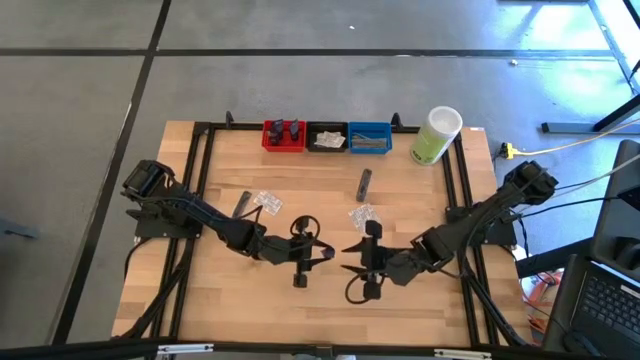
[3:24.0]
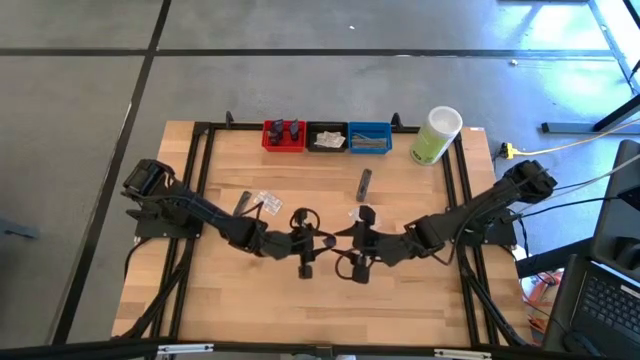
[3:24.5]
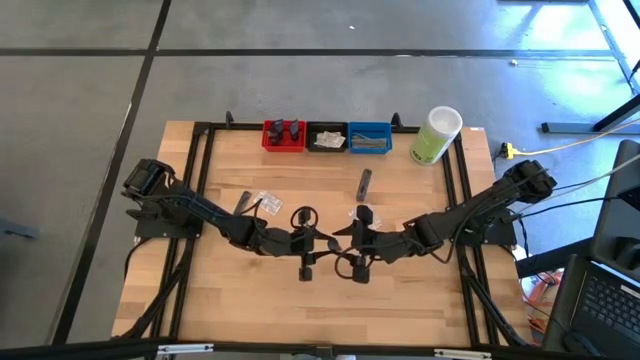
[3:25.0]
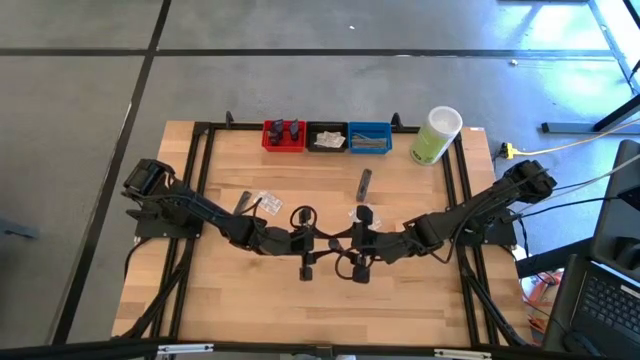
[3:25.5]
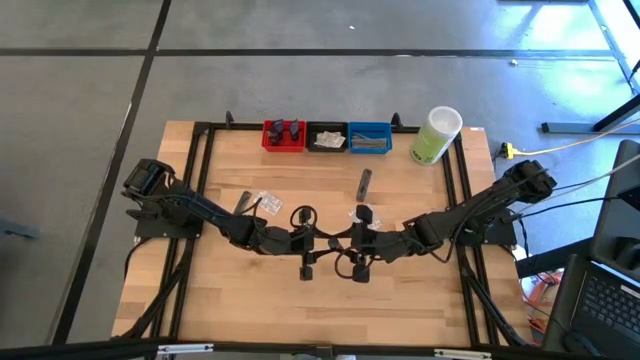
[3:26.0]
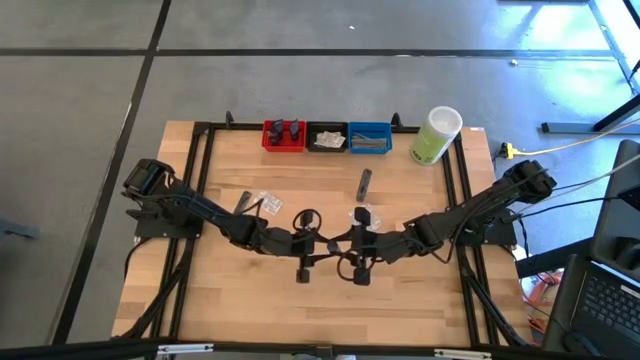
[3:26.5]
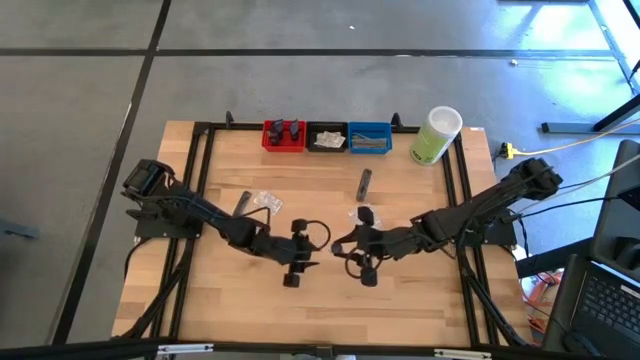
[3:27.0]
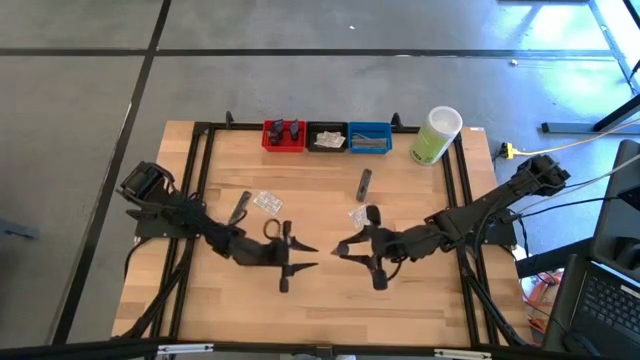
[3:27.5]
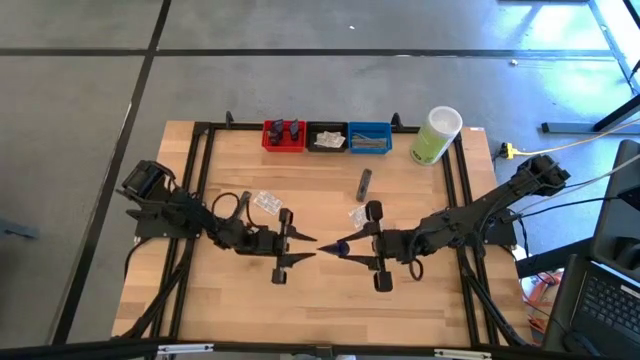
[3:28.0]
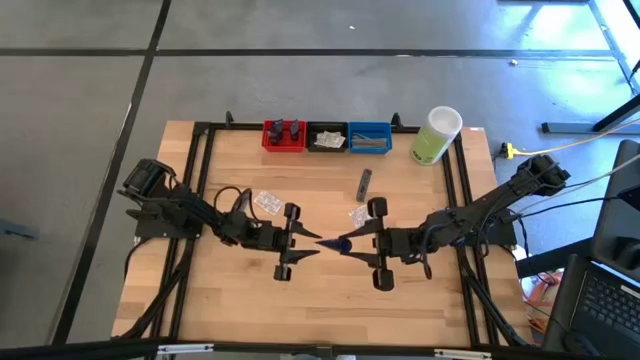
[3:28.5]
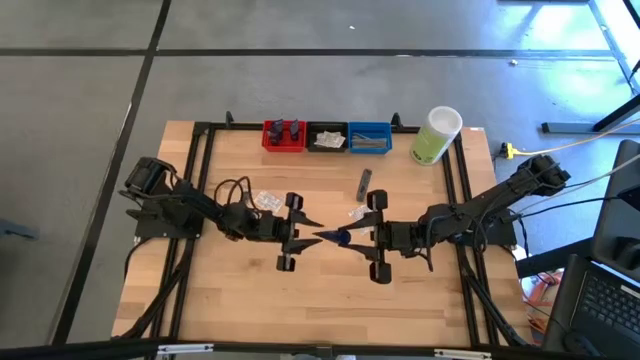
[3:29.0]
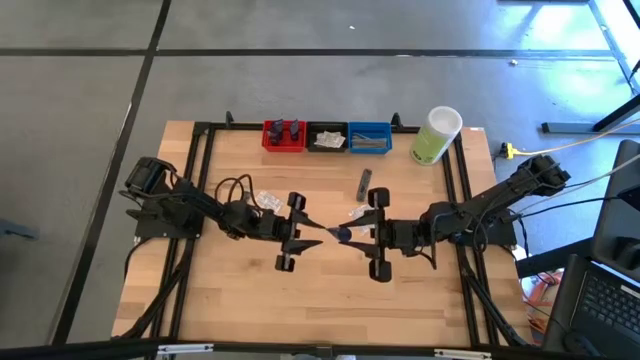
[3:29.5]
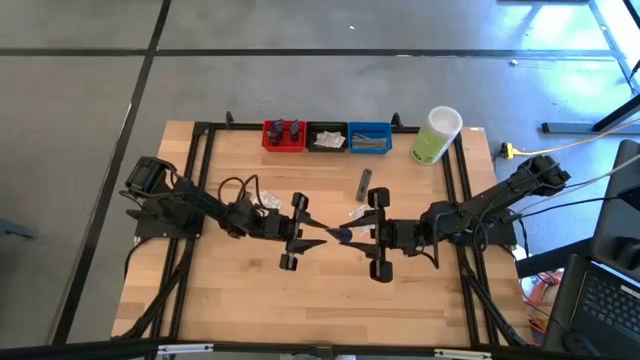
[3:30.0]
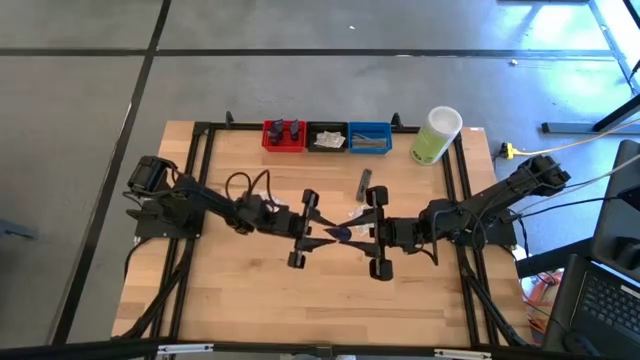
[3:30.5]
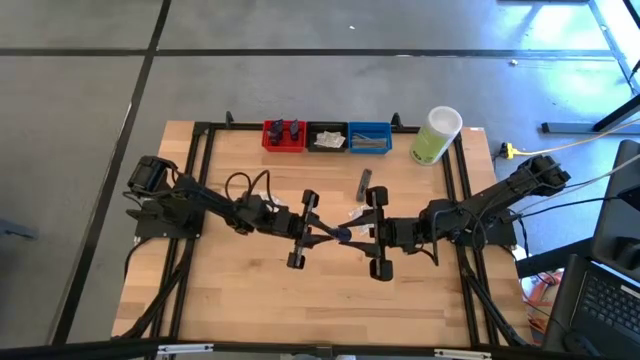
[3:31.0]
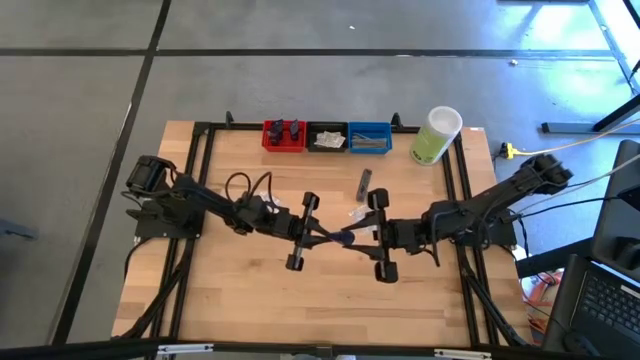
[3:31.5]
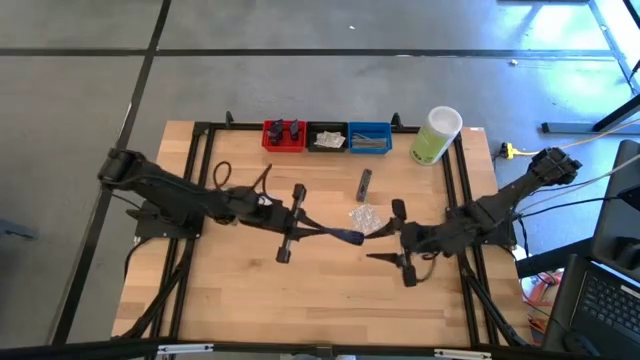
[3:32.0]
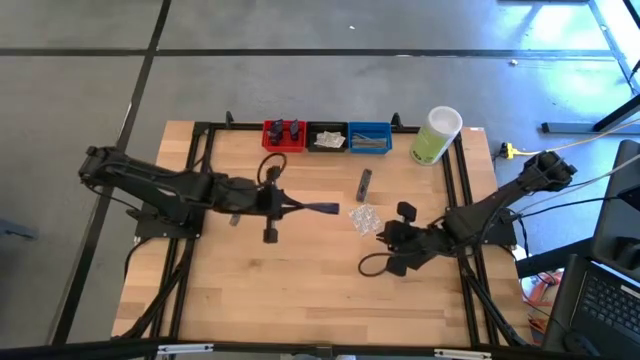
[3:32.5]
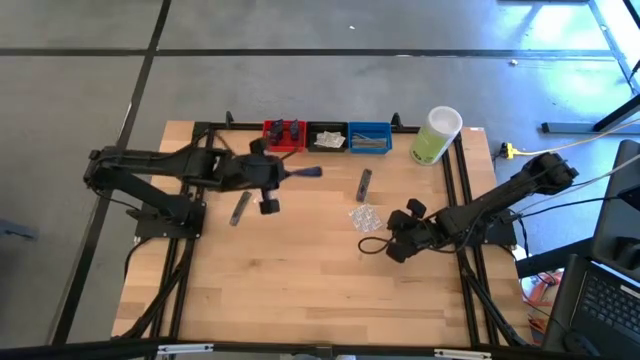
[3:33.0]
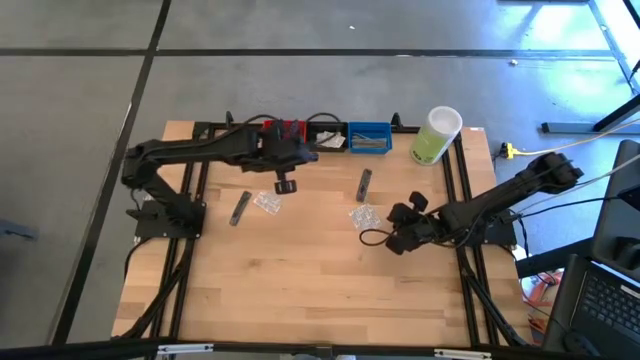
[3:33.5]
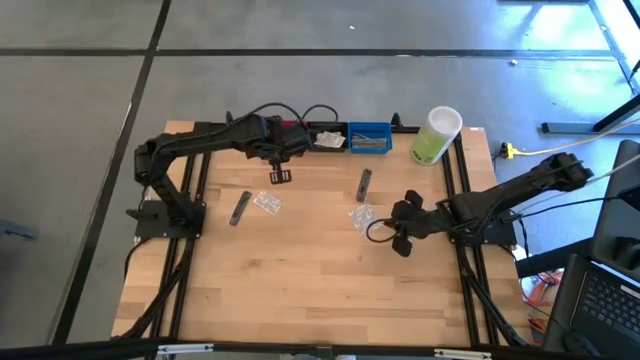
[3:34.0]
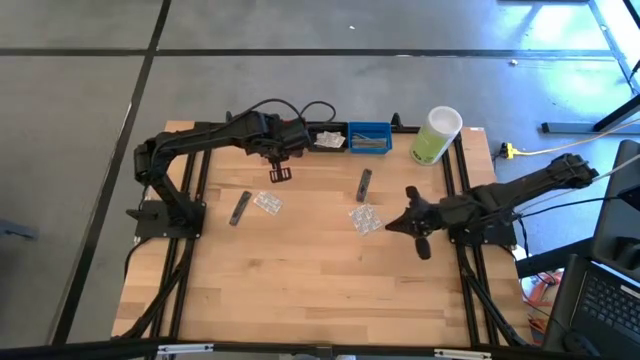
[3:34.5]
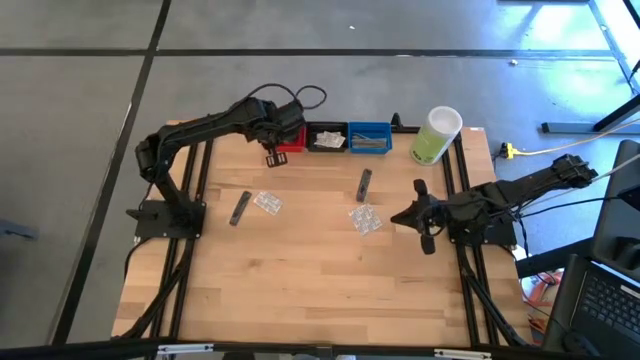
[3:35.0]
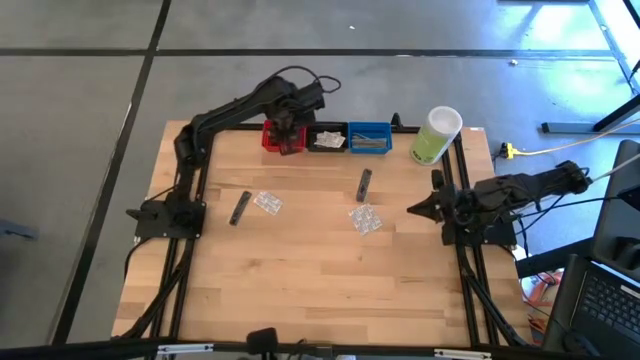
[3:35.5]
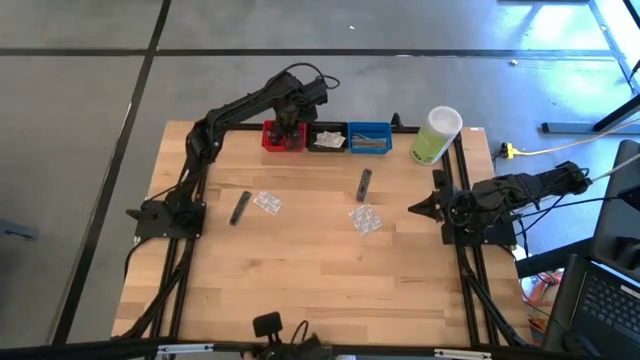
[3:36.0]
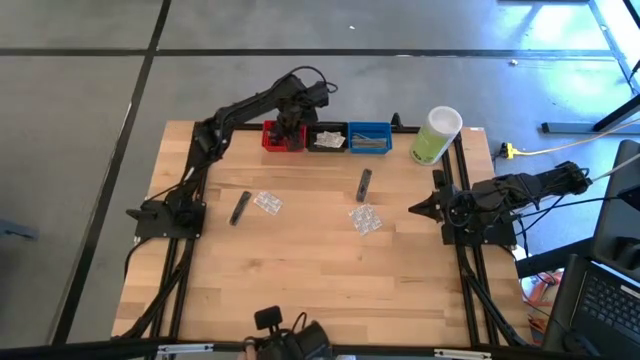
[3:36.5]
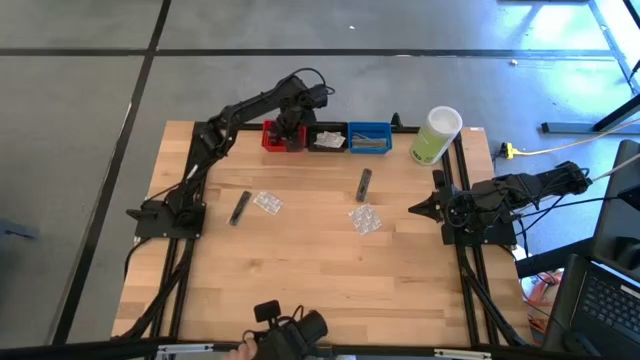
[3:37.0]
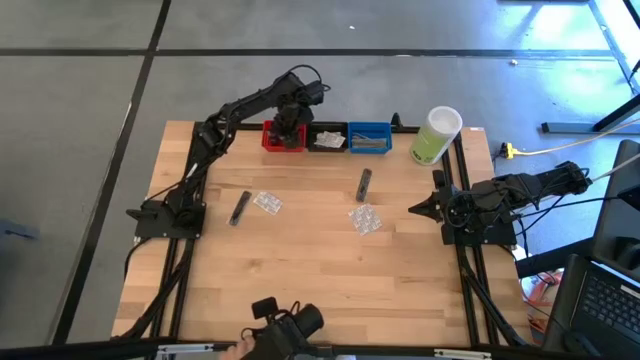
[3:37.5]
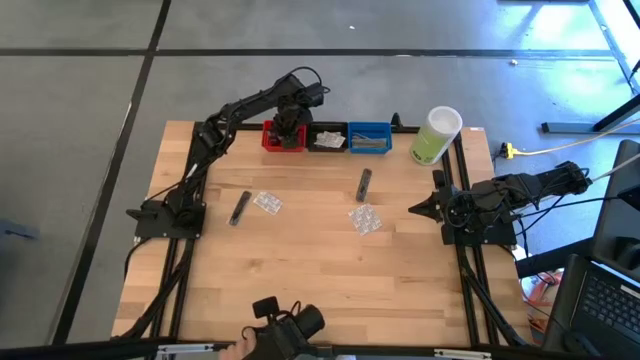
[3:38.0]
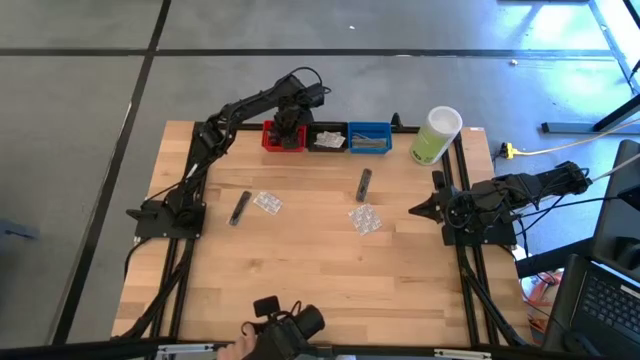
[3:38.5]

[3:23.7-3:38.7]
Task: Pick & Place Travel size toiletries
Put the blue shave cream into the red bin

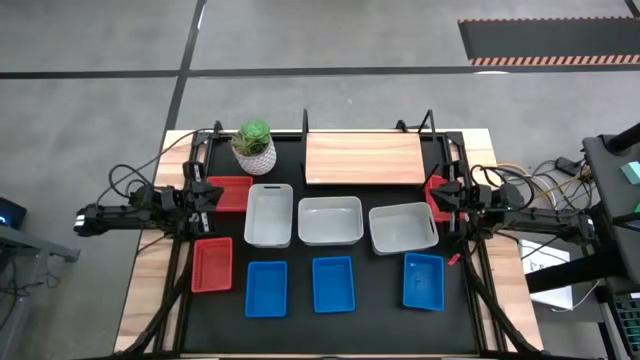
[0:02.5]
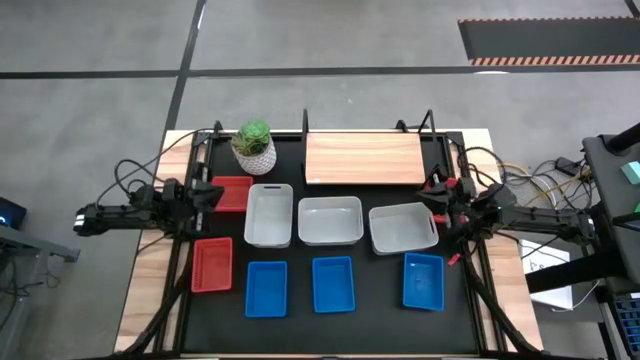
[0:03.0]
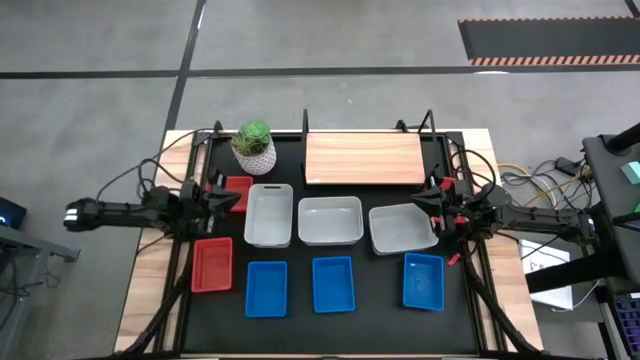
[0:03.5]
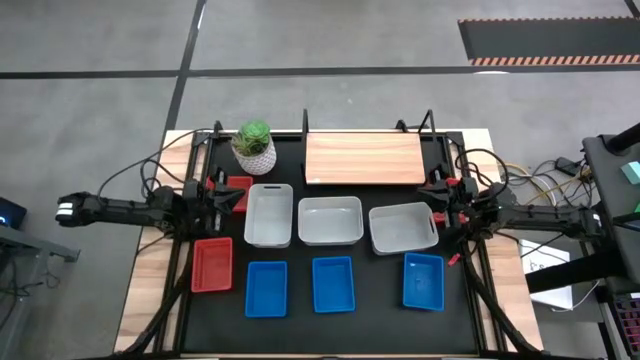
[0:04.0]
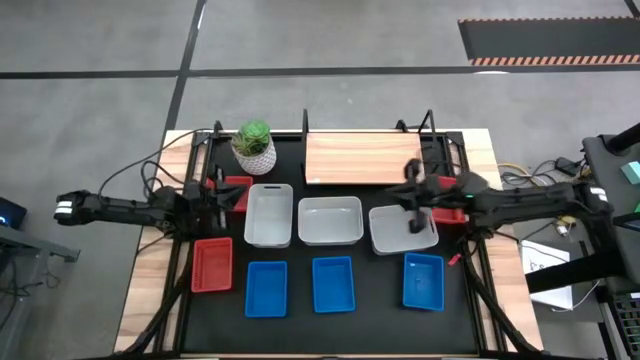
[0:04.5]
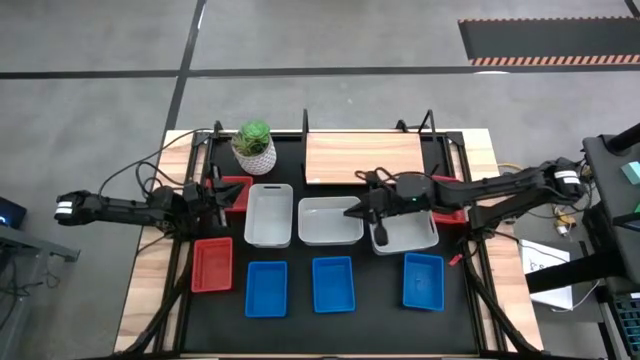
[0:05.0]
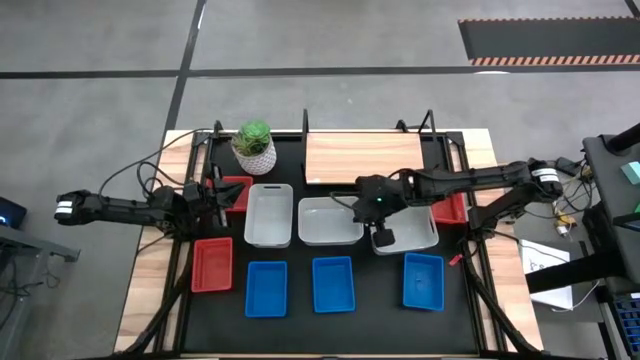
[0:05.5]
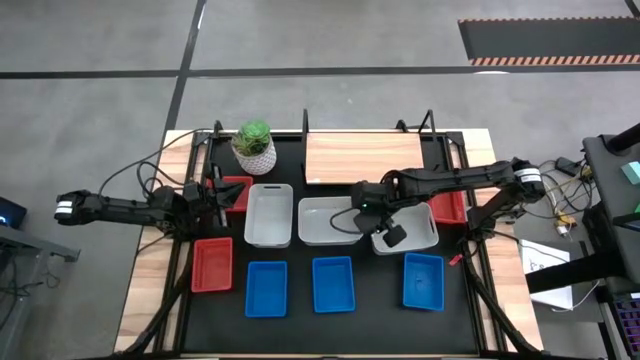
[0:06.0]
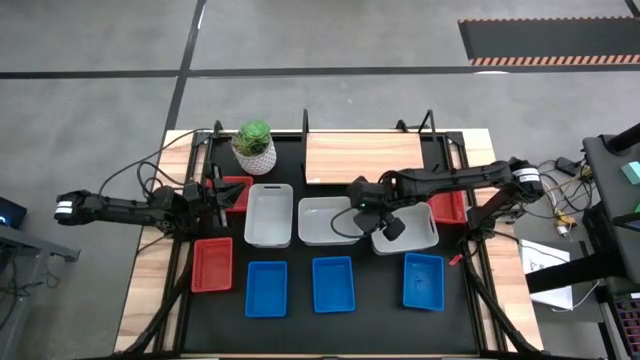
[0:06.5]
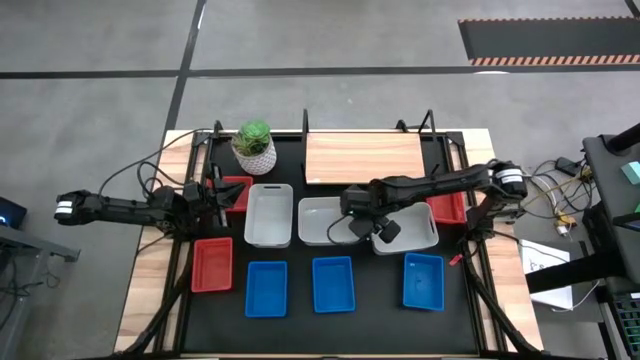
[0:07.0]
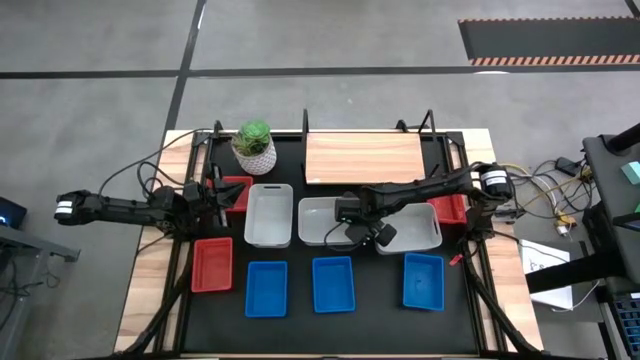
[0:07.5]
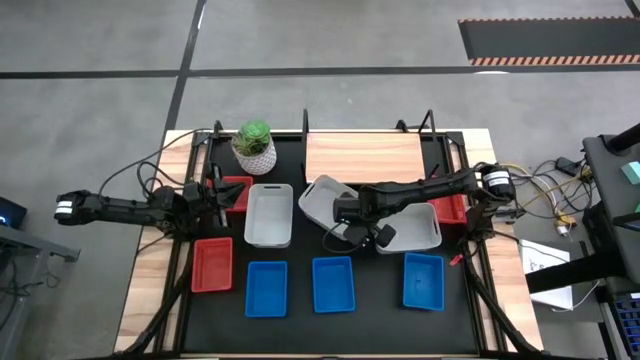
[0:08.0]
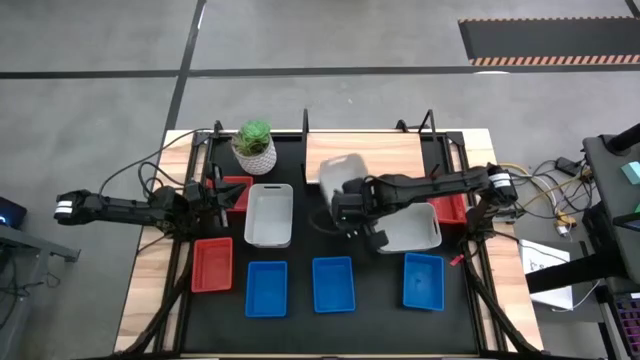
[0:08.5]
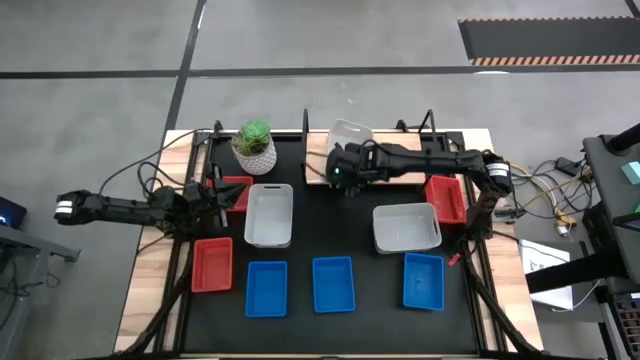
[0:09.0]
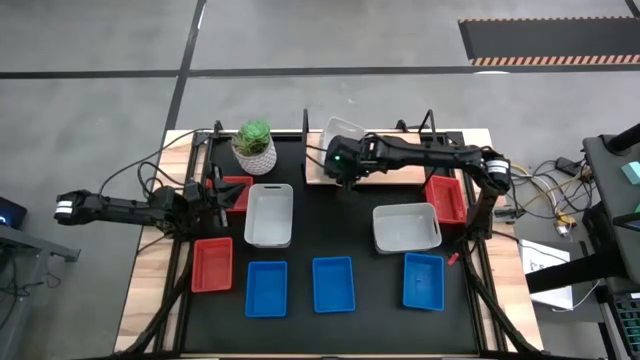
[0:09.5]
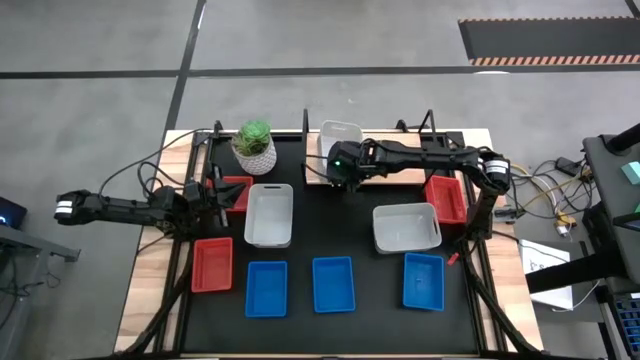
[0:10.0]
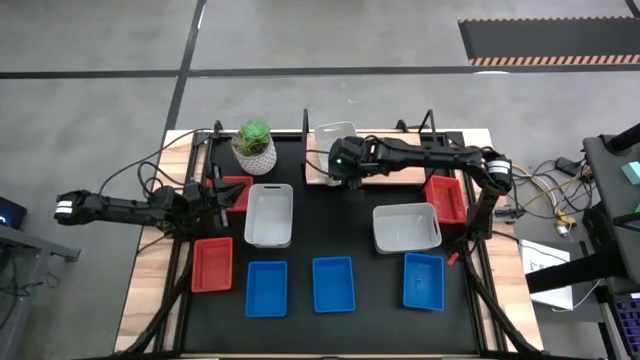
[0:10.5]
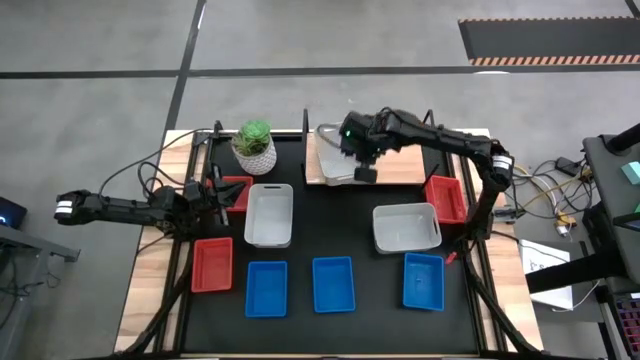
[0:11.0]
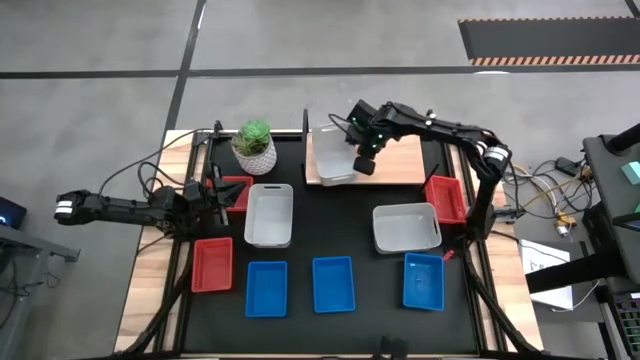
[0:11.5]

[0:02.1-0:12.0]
Task: Stack baskets on shelf by color
Put the middle white bin on the shelf
